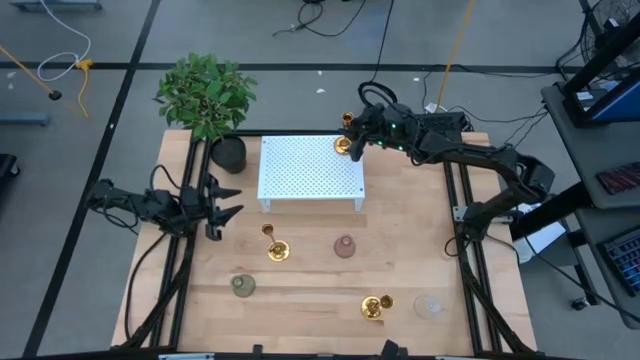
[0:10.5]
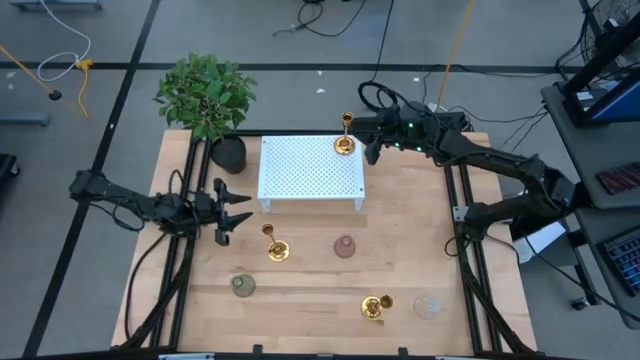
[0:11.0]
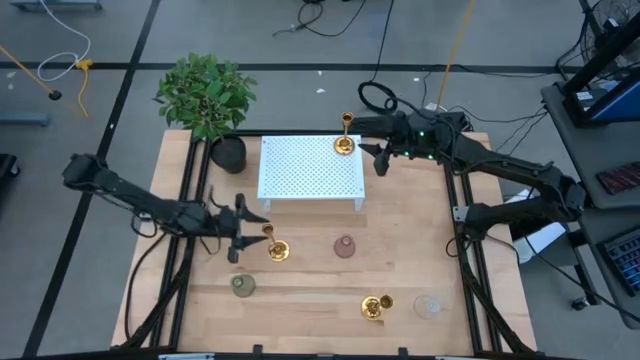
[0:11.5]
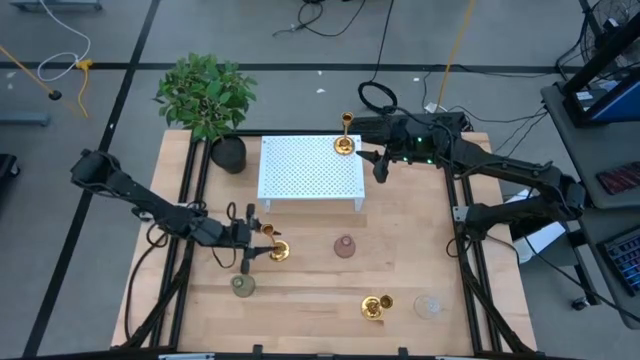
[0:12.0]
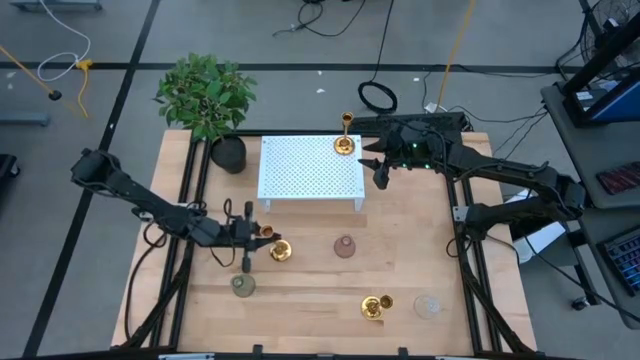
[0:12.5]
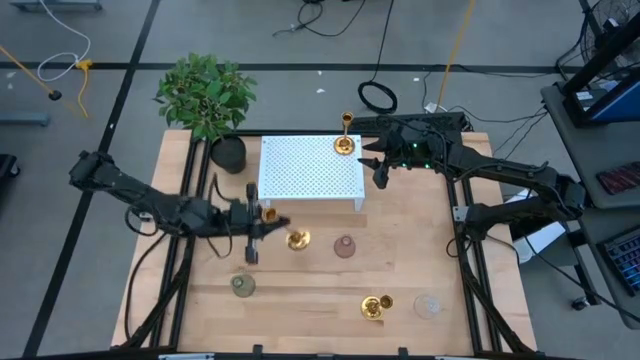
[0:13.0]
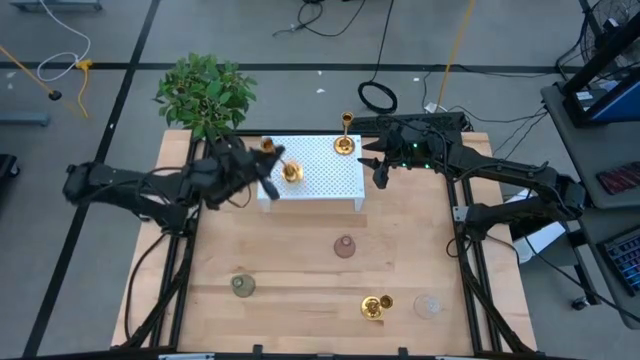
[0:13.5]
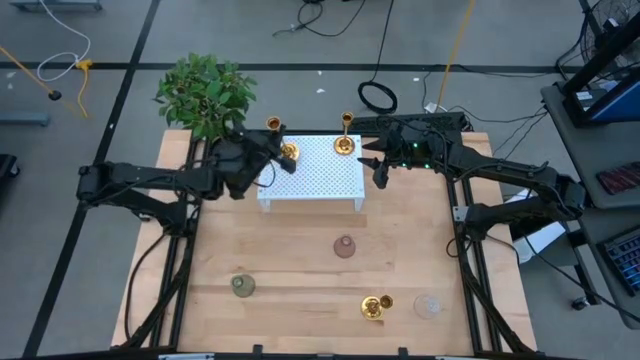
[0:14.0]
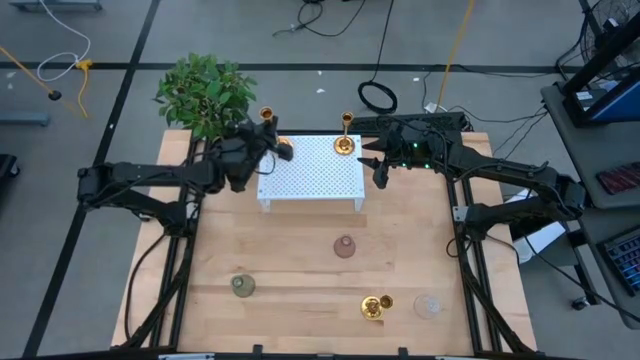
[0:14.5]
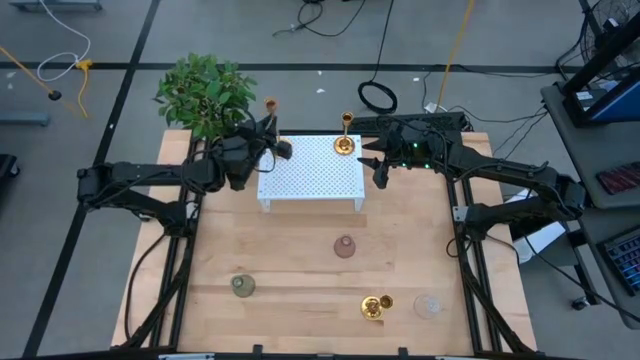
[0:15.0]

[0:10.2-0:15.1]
Task: Pick & Place candle stick holders
Put the left gold candle holder on the shelf

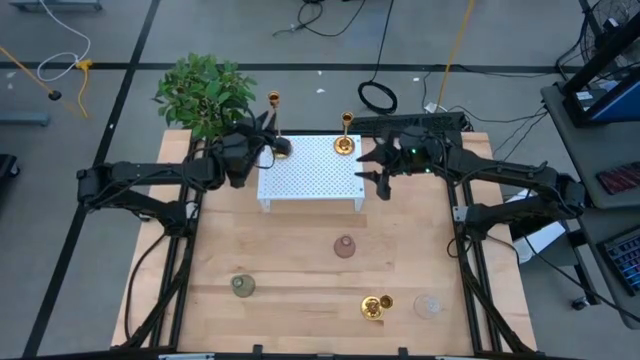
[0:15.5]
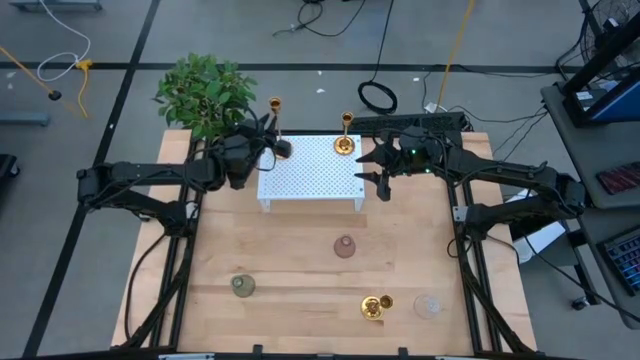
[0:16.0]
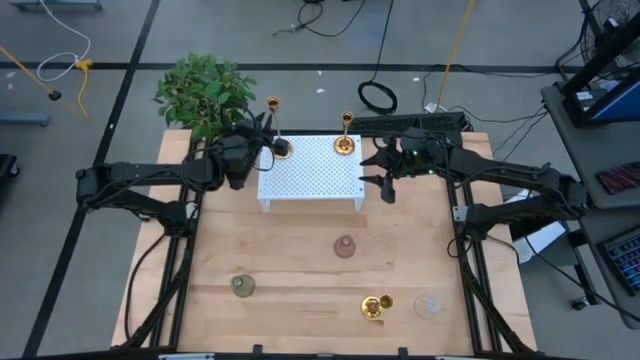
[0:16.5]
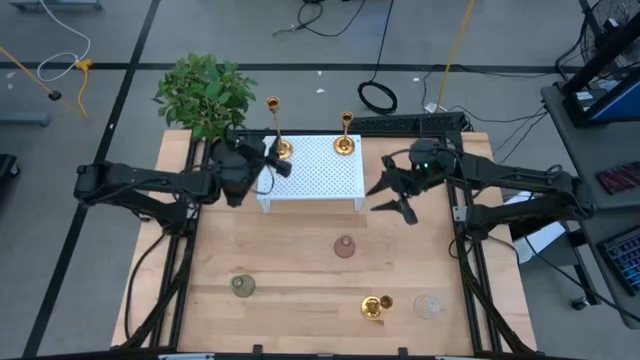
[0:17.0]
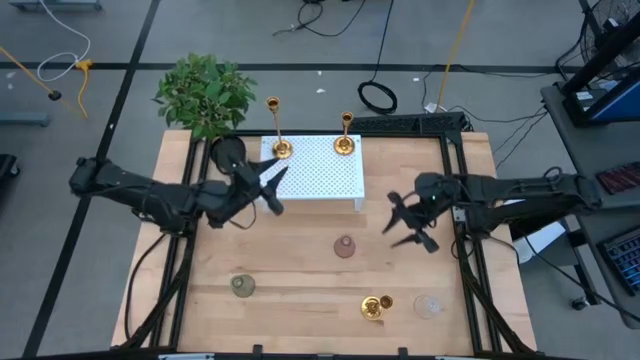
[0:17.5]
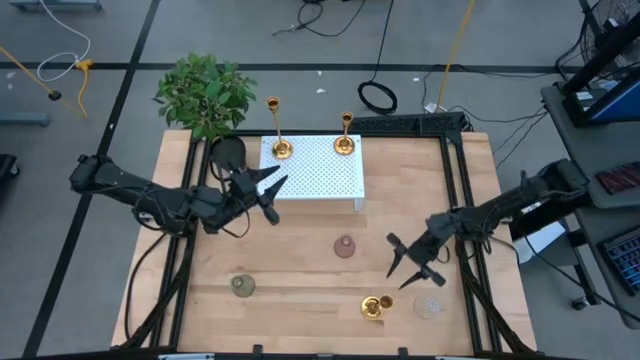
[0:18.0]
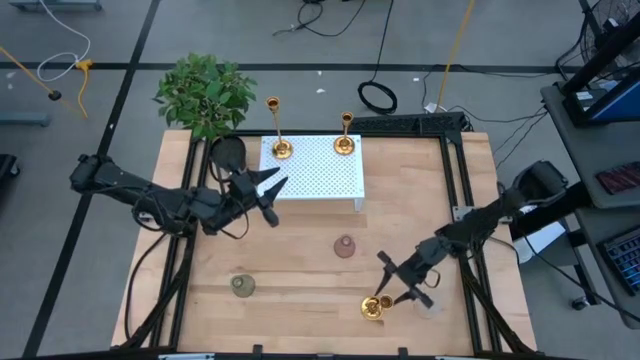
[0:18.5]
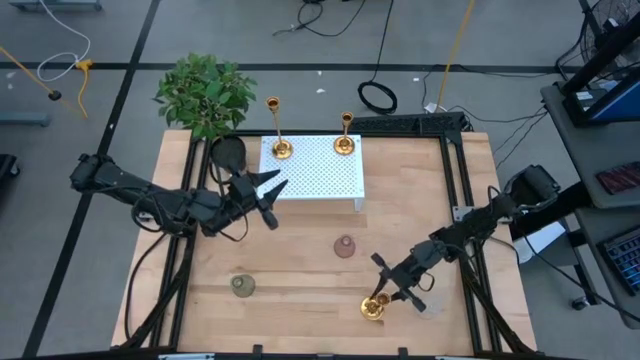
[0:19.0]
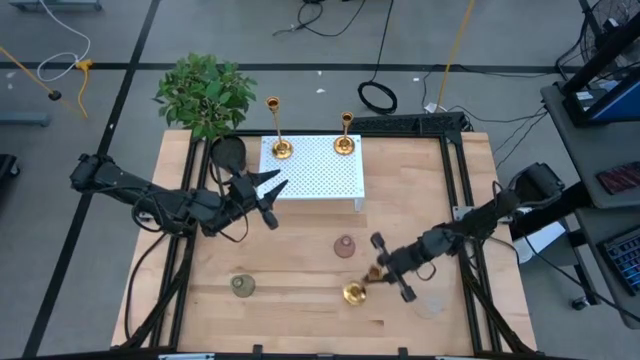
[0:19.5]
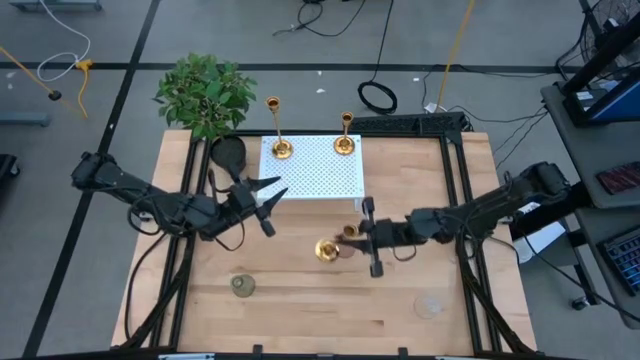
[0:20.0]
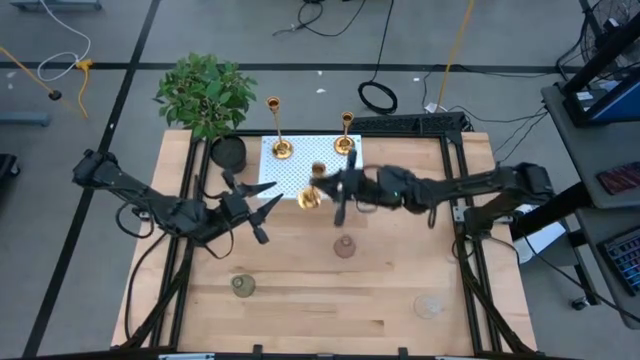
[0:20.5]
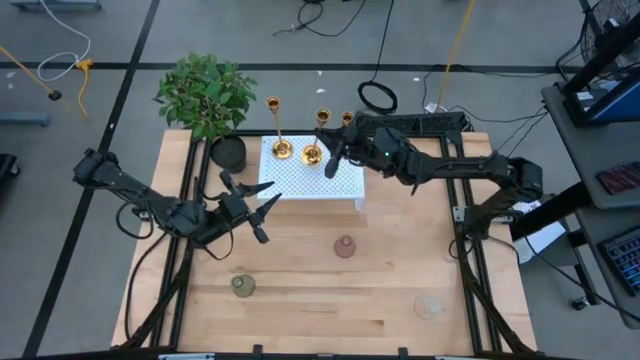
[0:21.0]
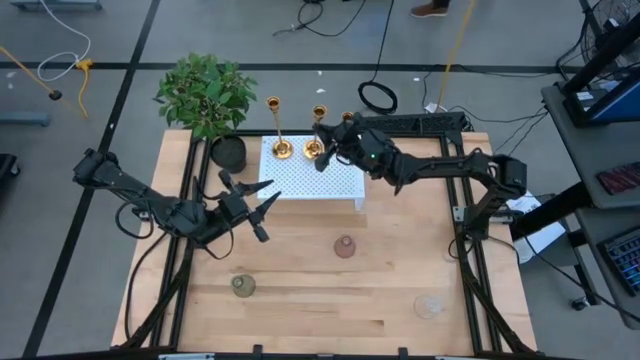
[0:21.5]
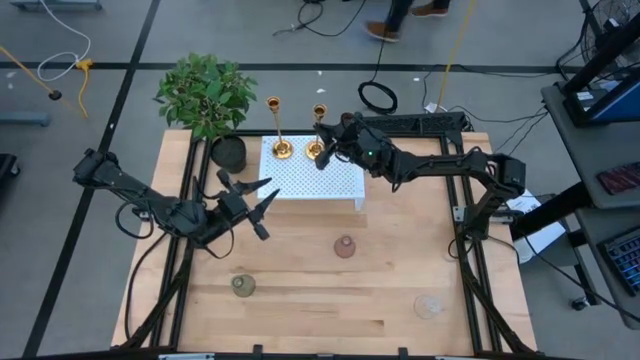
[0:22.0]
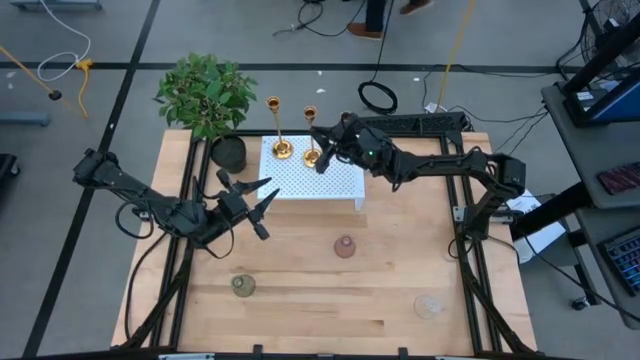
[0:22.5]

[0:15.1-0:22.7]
Put the gold candle holder on the shelf

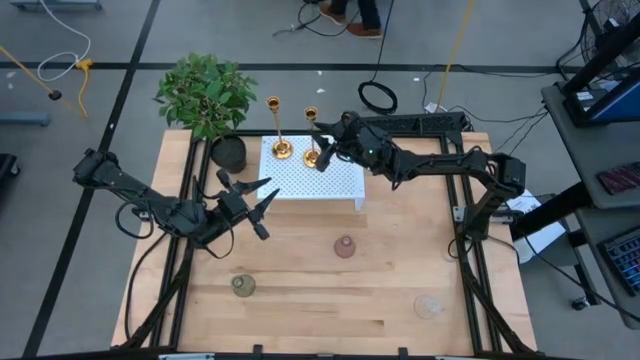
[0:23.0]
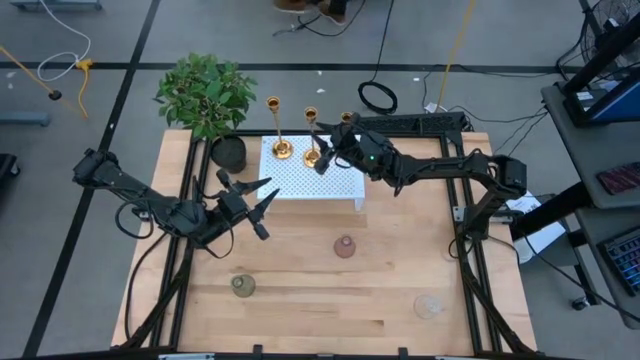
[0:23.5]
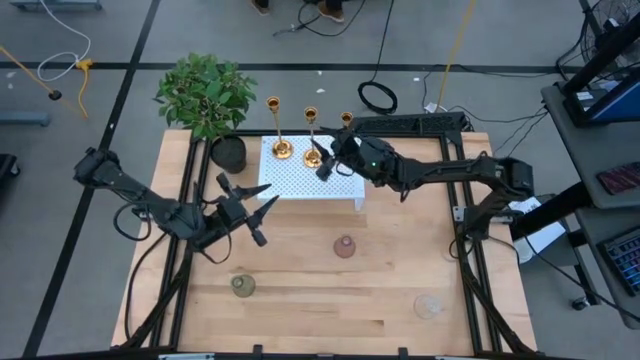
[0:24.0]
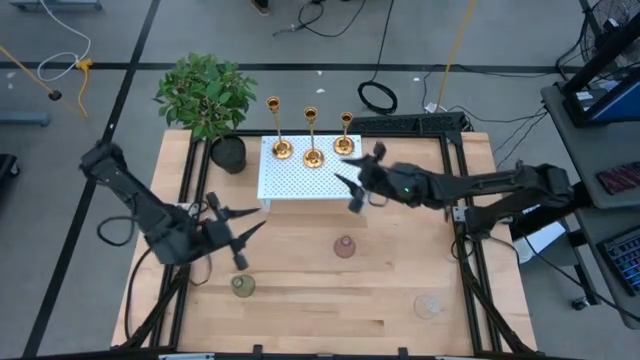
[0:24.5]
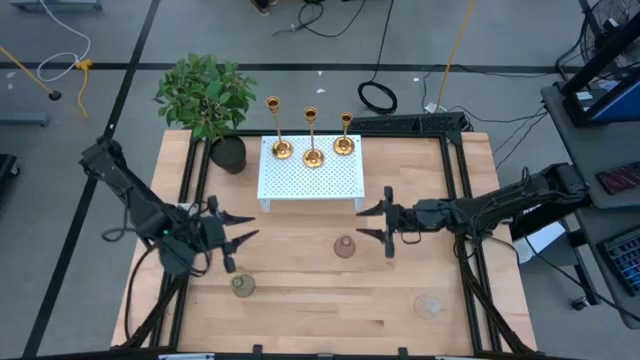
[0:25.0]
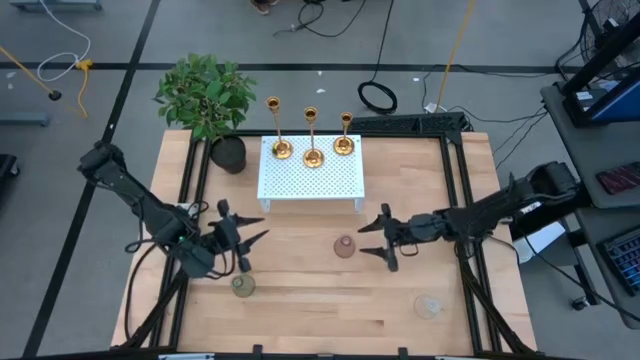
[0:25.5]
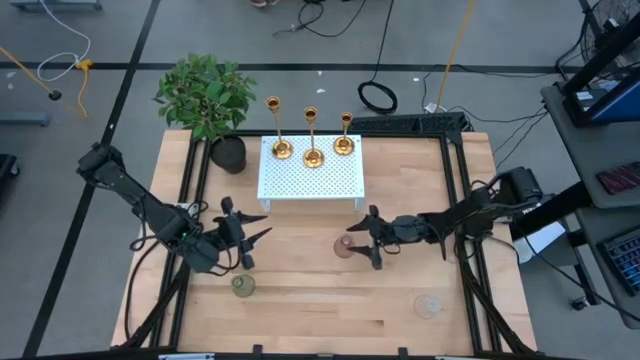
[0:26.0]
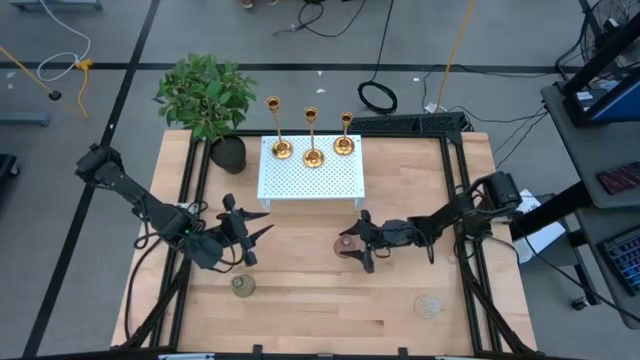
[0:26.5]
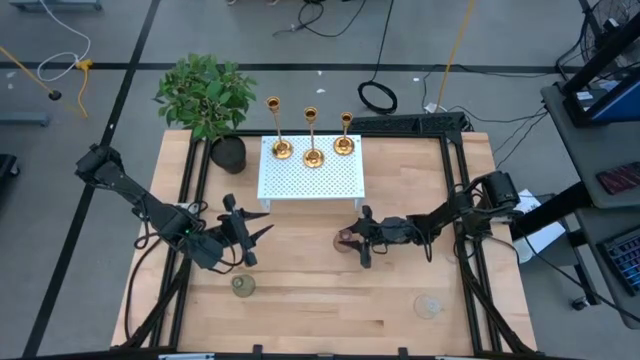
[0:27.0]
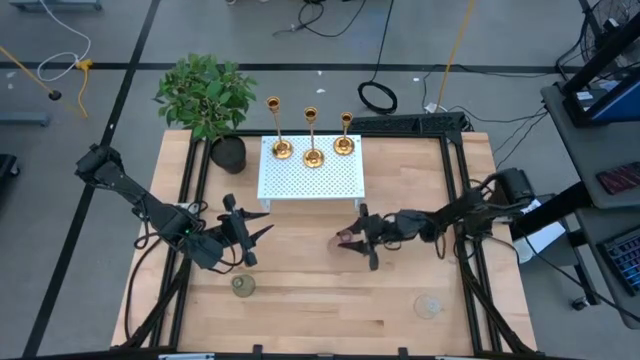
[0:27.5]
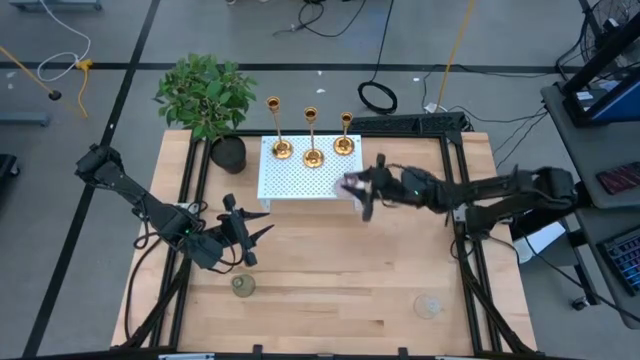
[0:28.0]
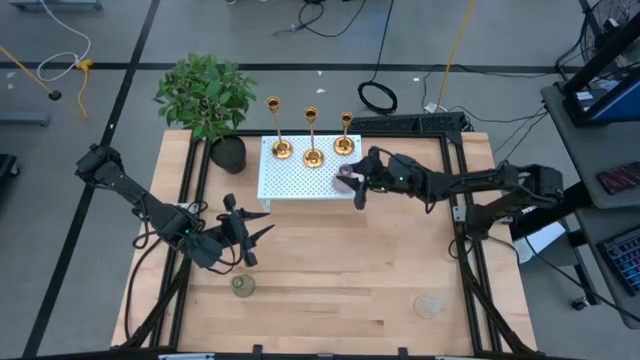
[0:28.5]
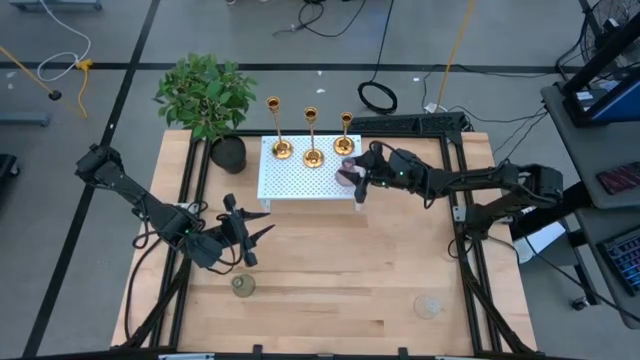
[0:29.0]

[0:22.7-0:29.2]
Put the pink candle holder on the shelf

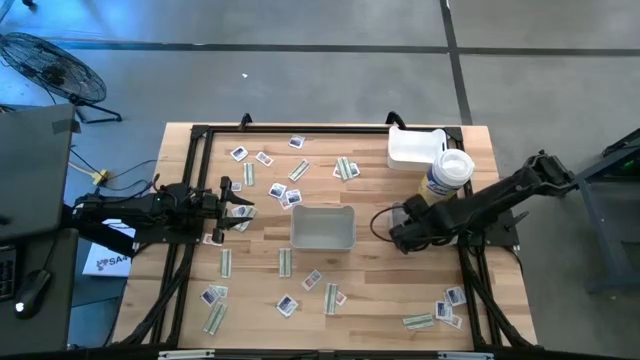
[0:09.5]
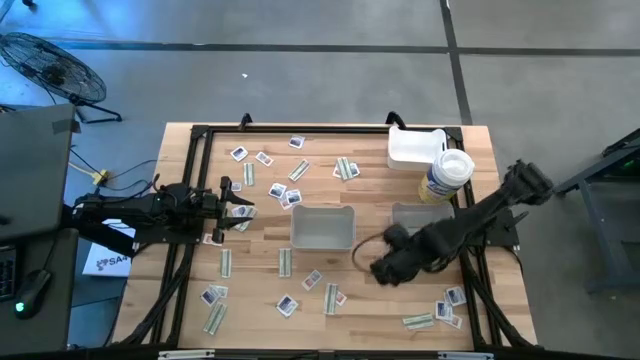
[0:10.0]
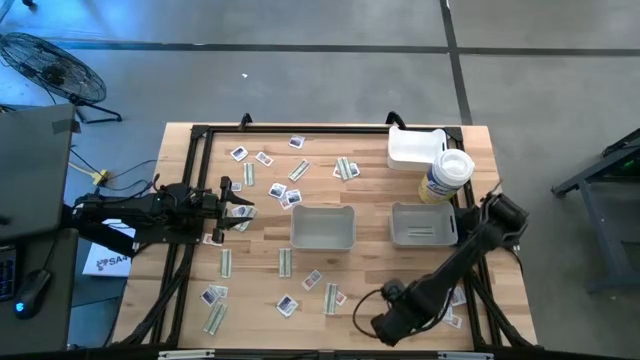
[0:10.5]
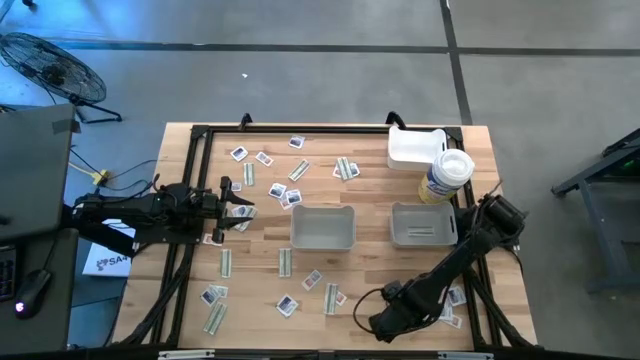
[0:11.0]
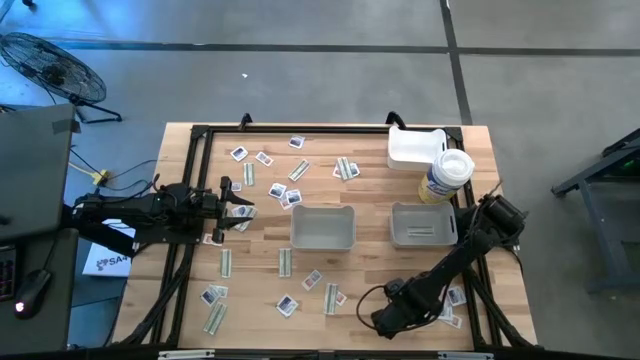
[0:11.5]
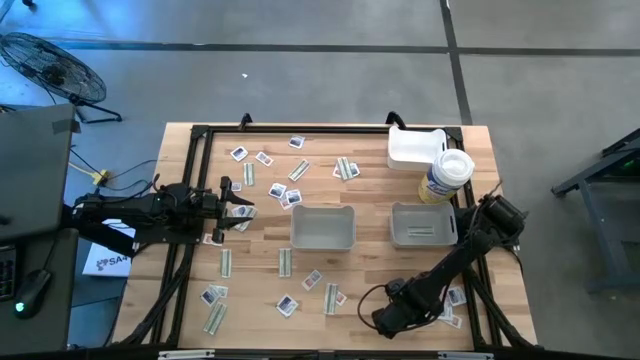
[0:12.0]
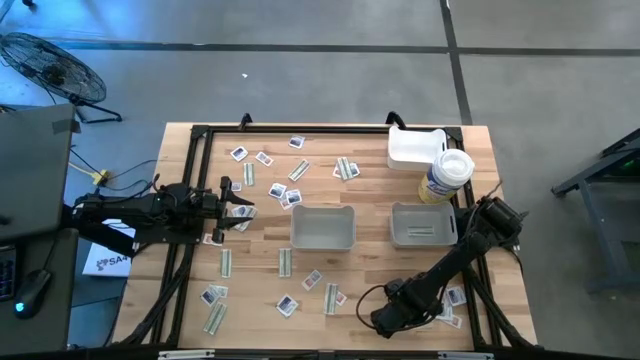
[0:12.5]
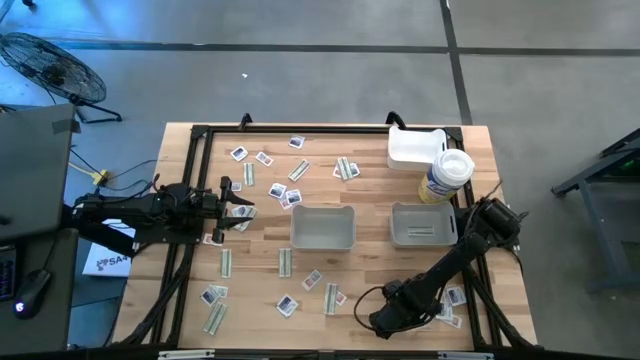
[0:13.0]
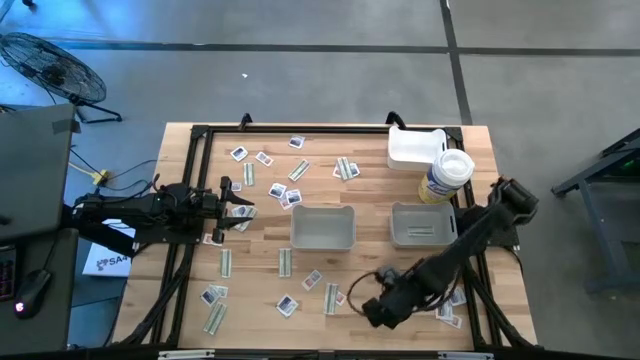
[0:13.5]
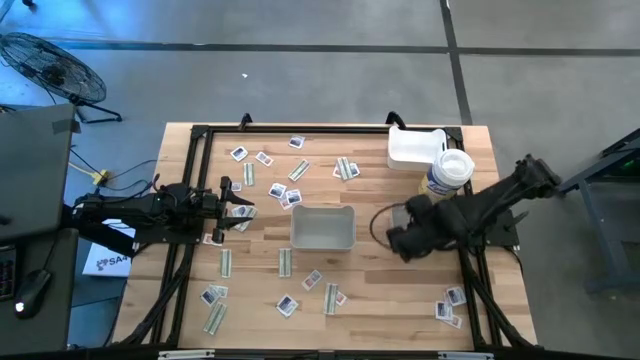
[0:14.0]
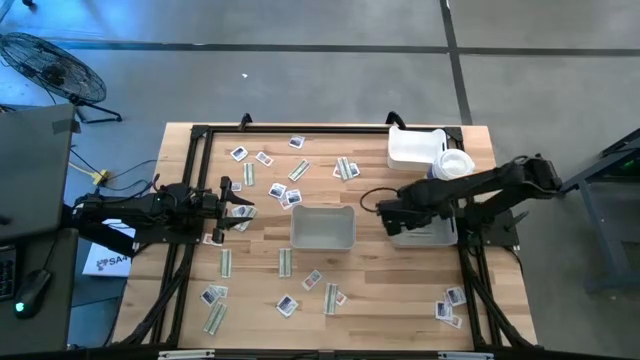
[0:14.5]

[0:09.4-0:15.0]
Task: Pick & Place First Aid Supplies
Put the green pad into the right gray bin
